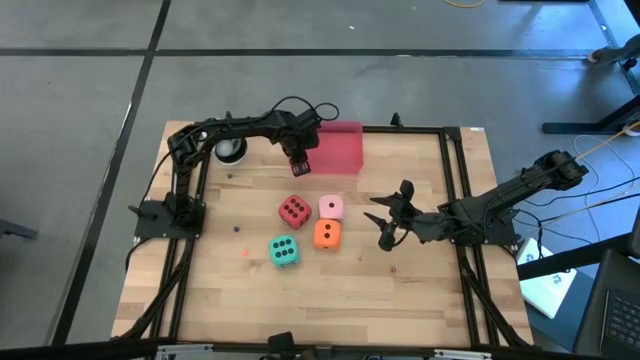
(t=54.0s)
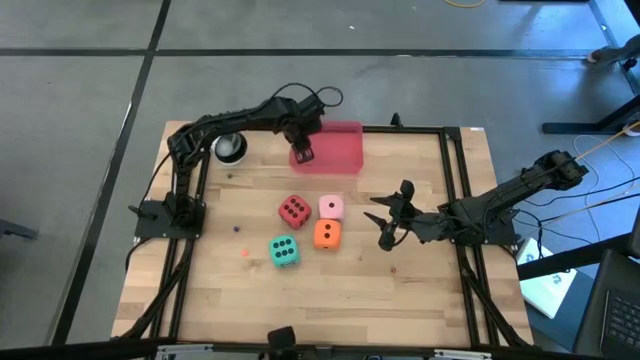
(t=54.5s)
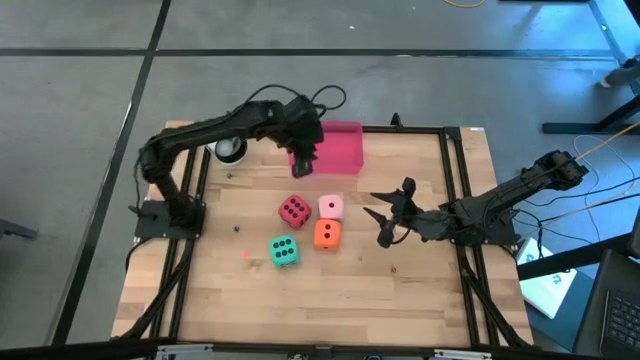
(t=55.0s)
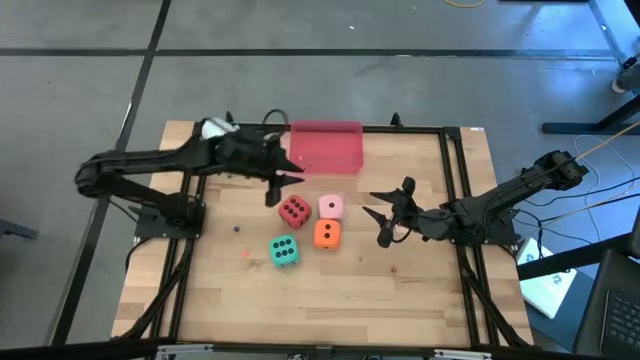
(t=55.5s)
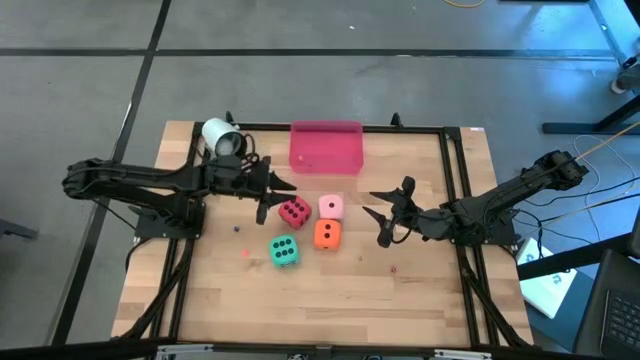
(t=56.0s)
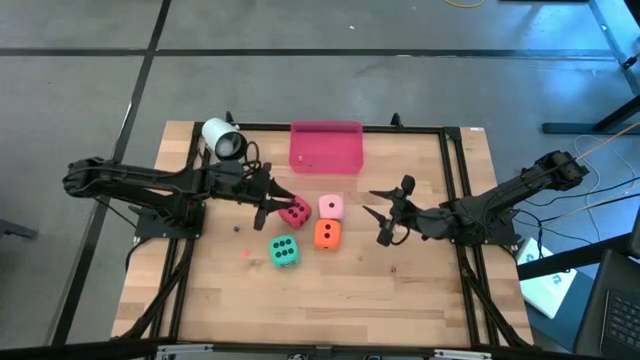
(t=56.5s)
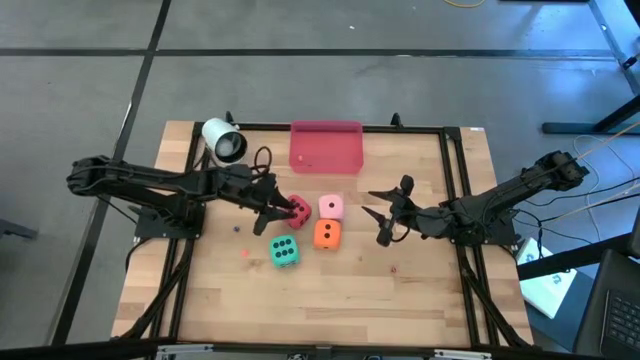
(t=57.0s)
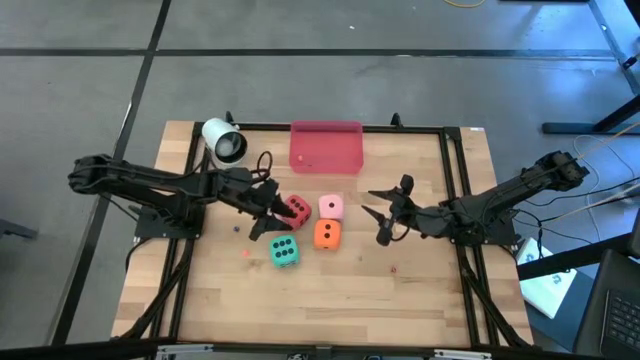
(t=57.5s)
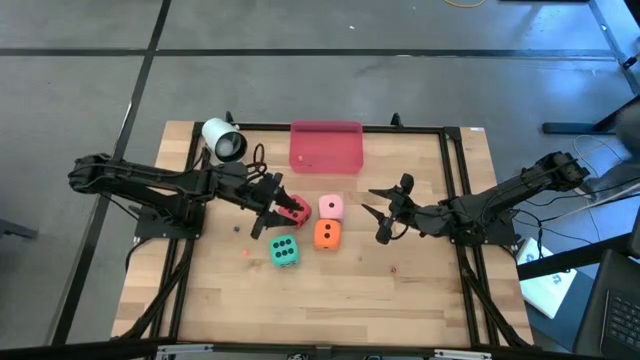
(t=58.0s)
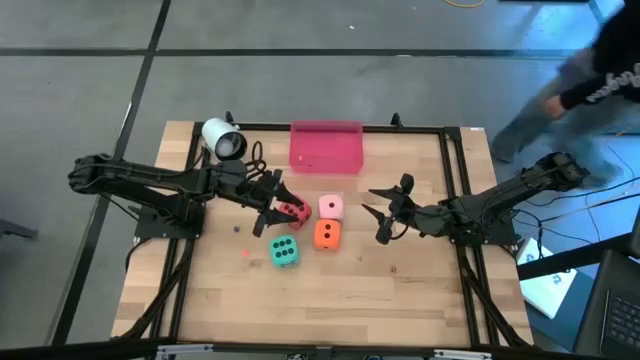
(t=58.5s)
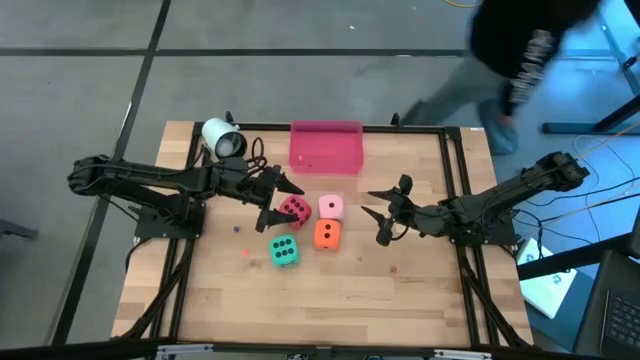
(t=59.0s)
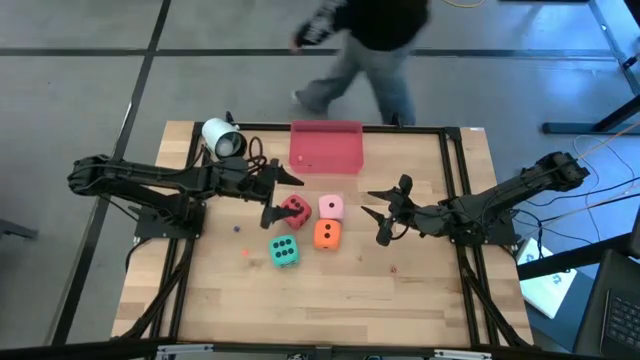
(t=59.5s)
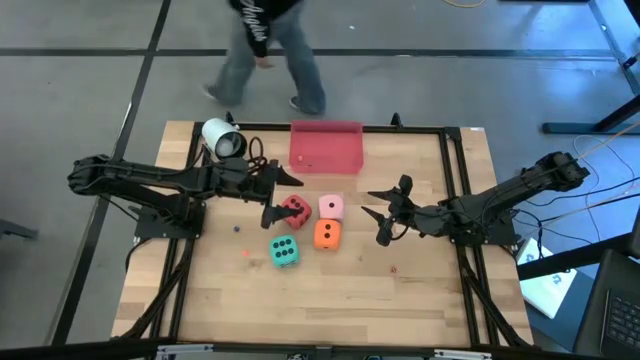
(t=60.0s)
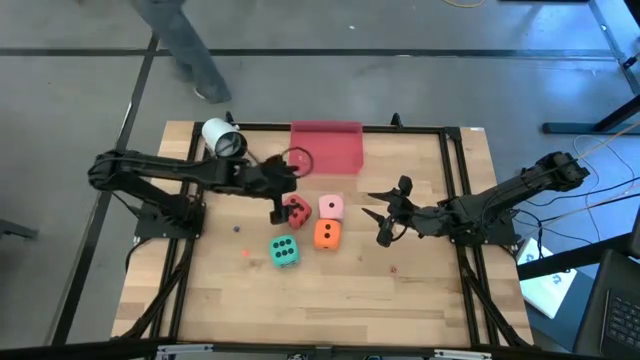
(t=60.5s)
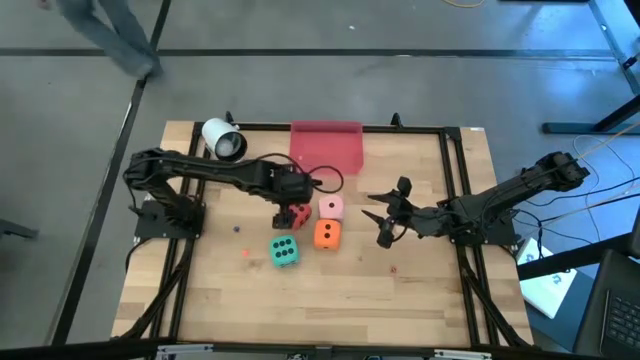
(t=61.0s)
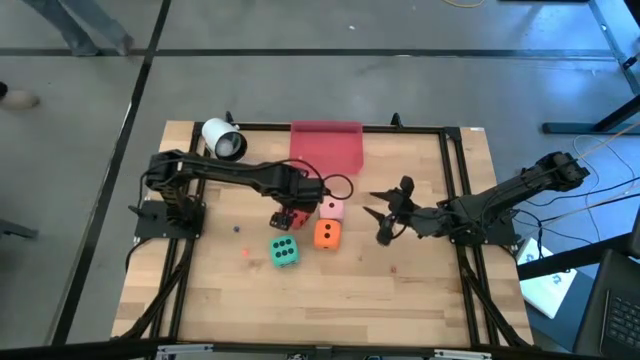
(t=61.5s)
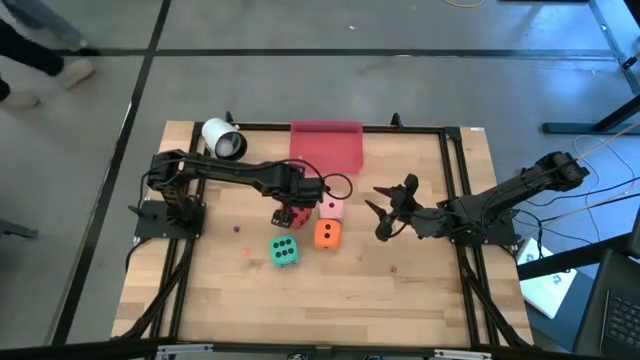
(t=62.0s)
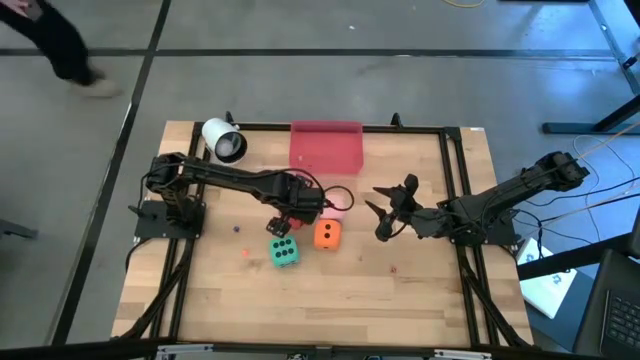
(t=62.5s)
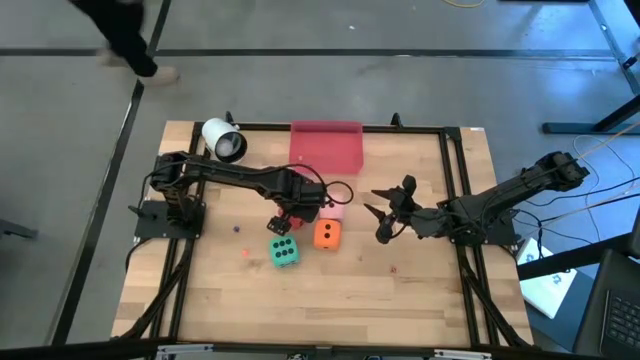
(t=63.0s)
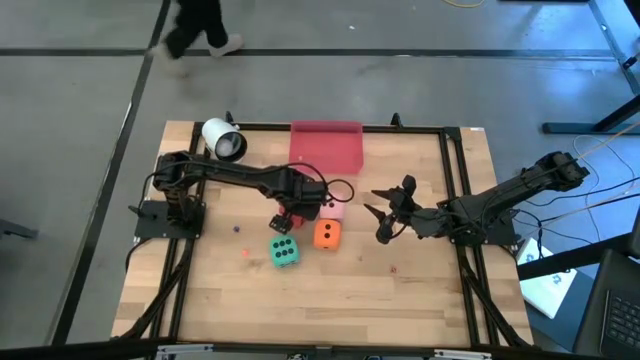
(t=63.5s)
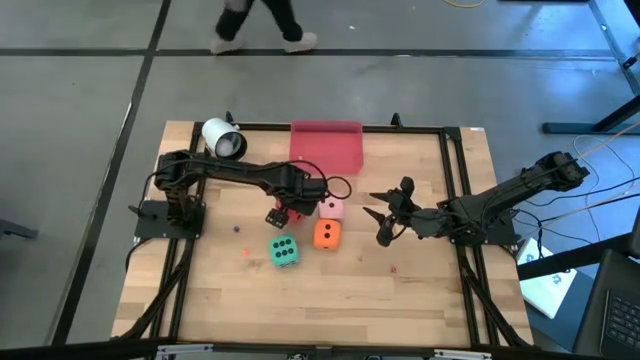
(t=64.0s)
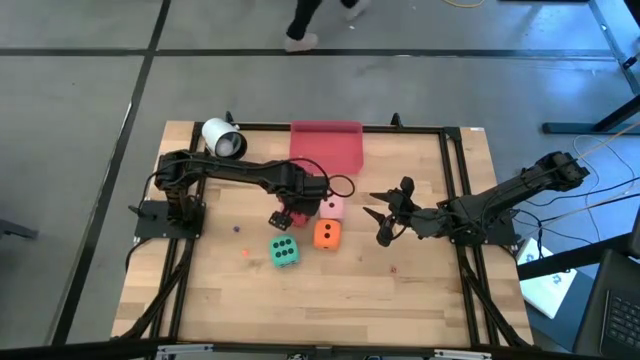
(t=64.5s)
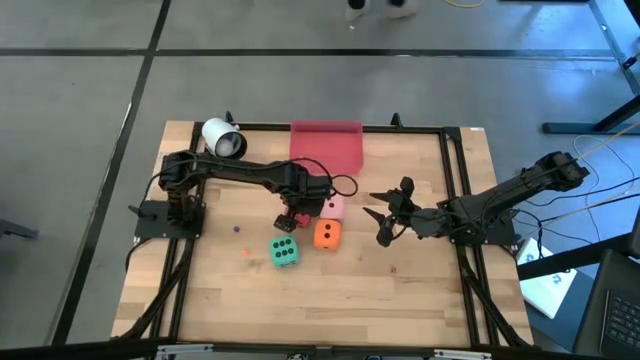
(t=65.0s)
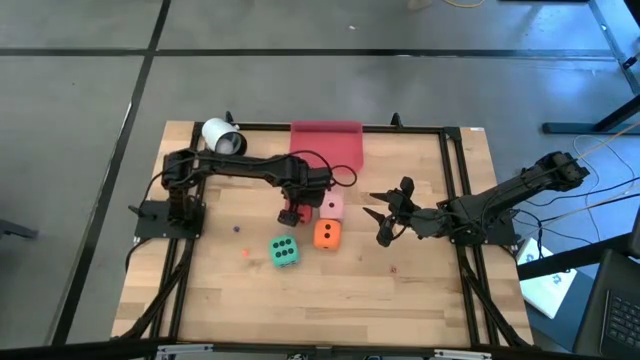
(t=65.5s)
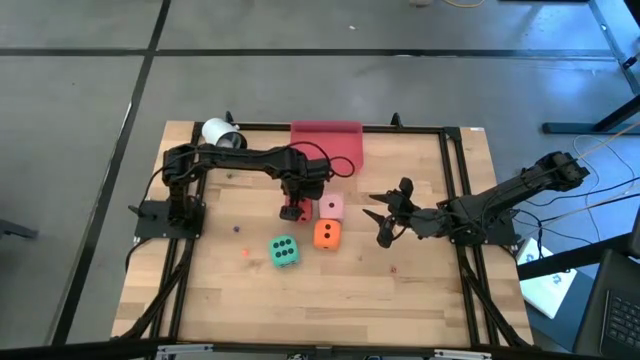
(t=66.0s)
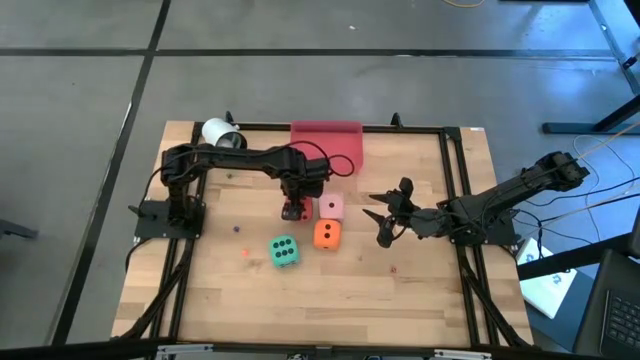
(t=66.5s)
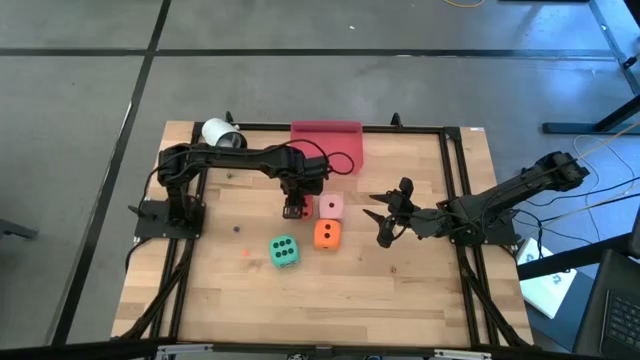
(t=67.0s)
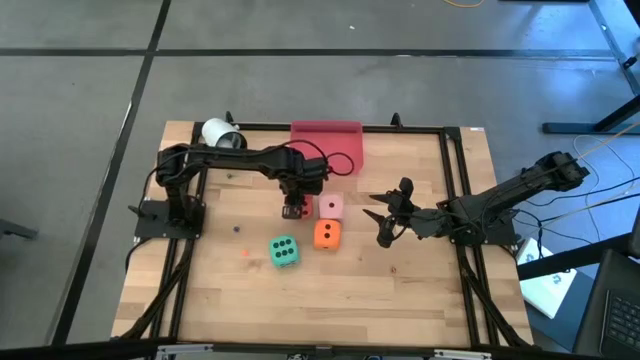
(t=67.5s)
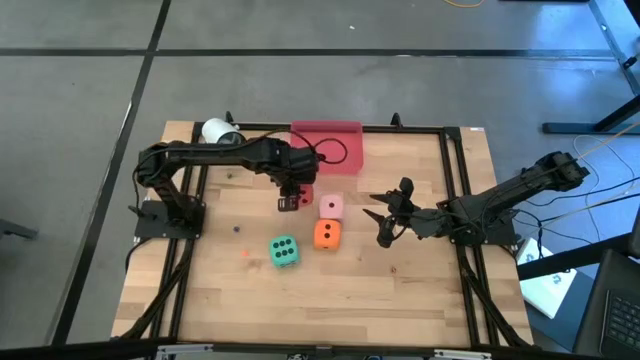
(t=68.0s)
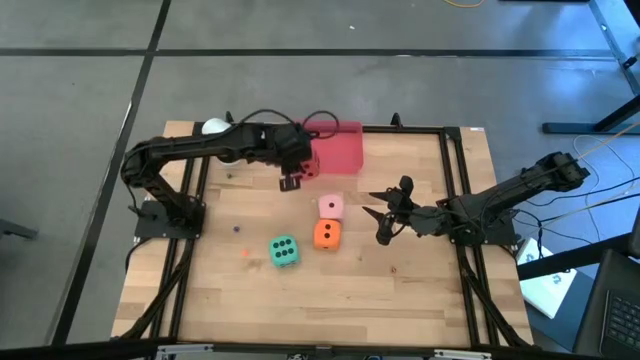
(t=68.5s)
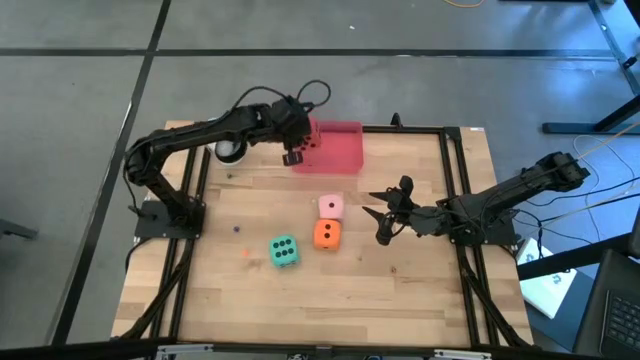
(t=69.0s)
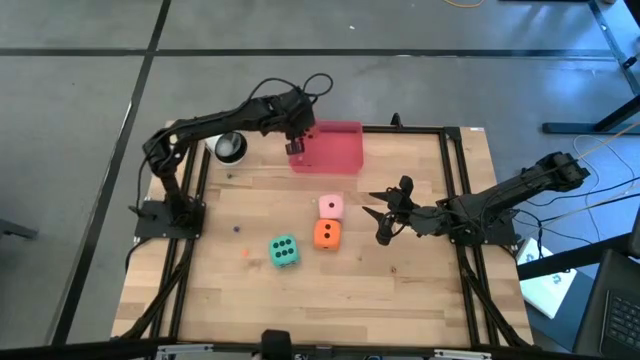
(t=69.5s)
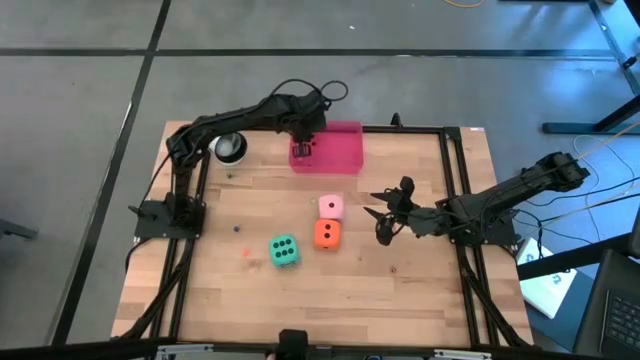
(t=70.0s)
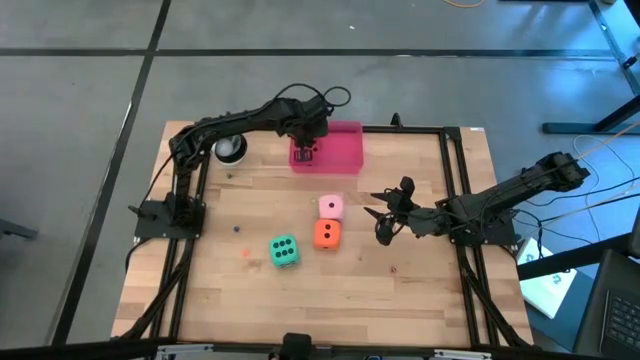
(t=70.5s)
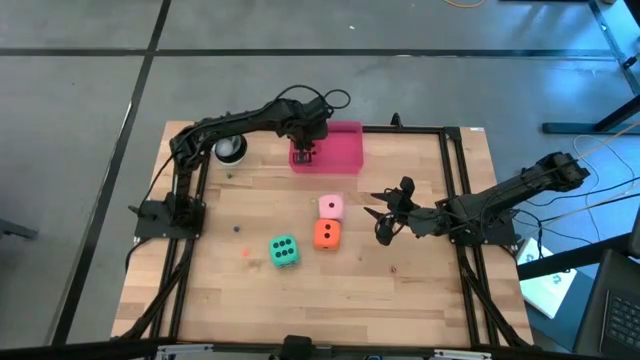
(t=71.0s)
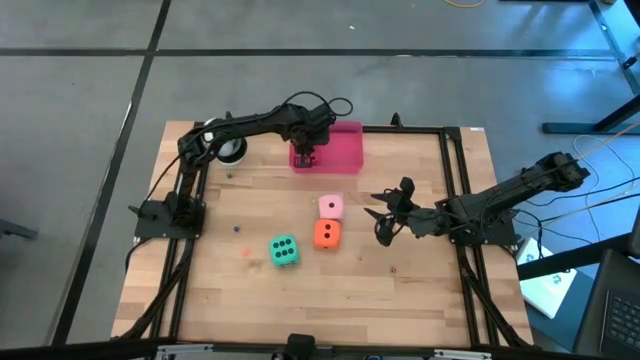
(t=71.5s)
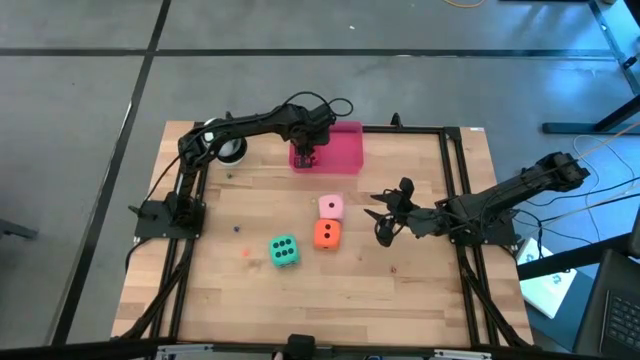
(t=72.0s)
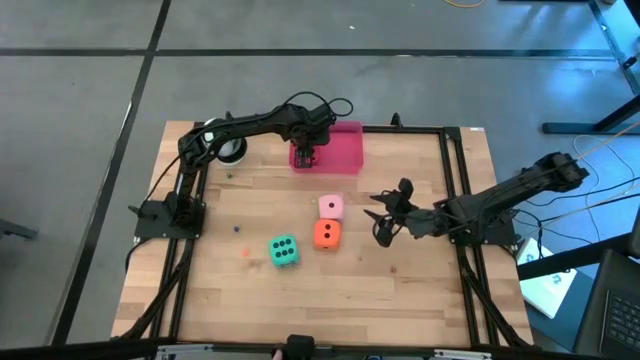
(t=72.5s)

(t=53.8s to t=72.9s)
Task: Pick & Place Dice
Put the top red die into the pink bin

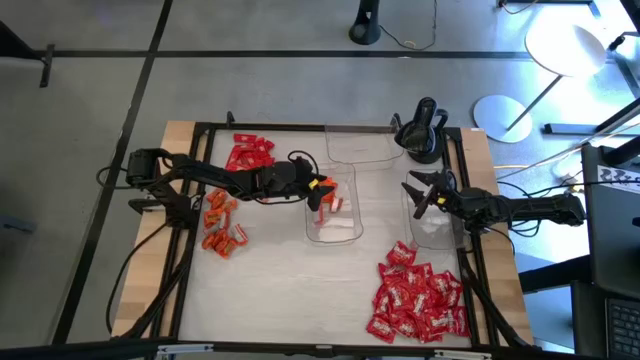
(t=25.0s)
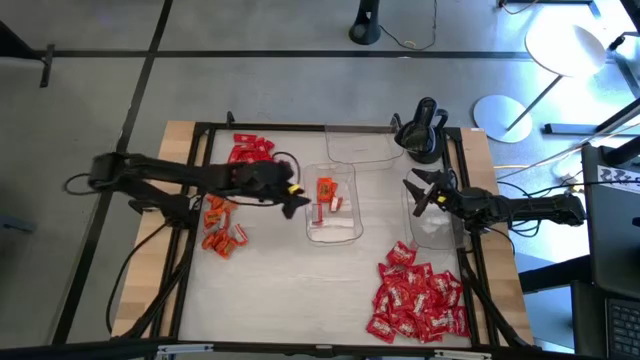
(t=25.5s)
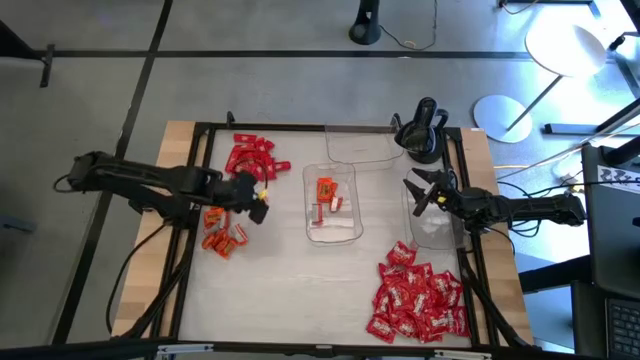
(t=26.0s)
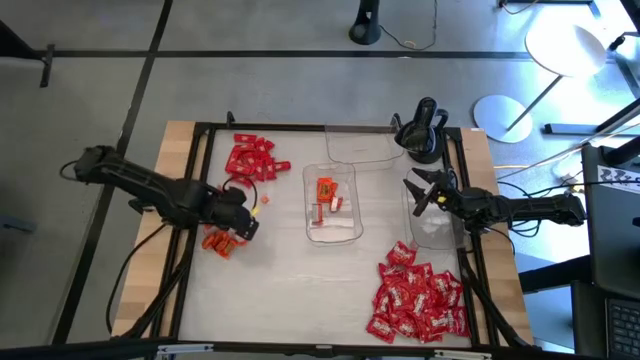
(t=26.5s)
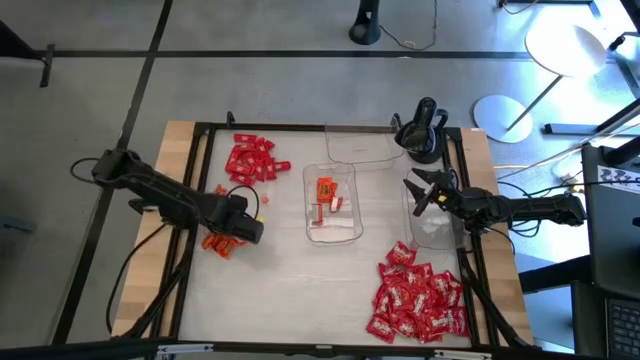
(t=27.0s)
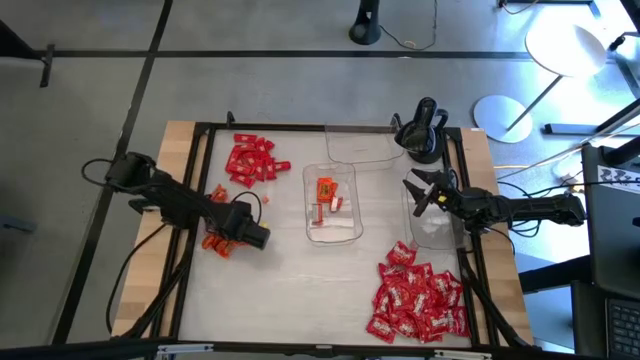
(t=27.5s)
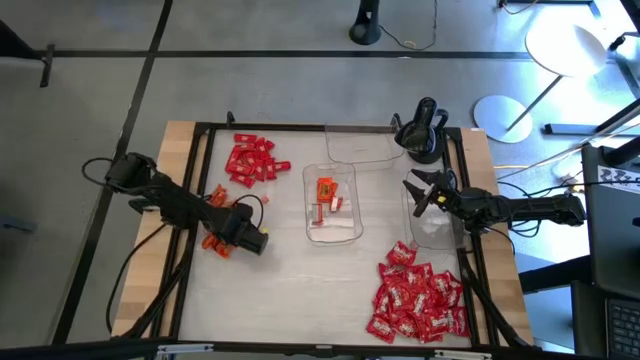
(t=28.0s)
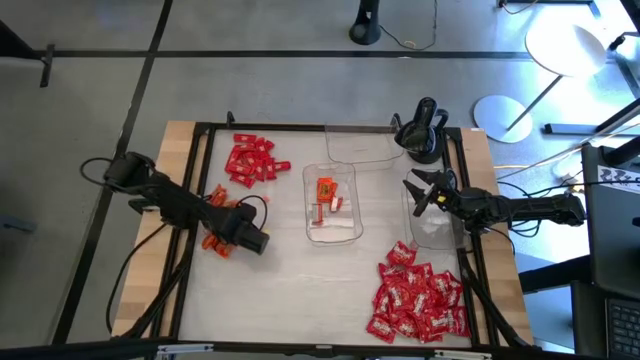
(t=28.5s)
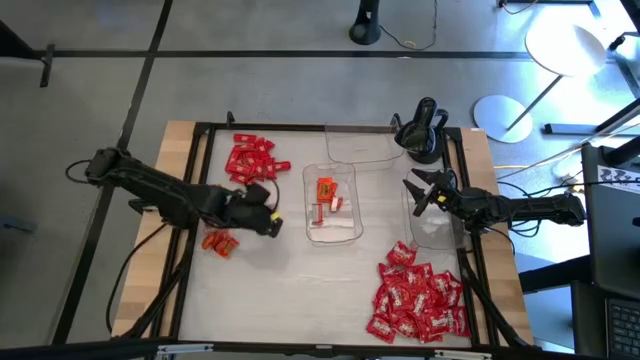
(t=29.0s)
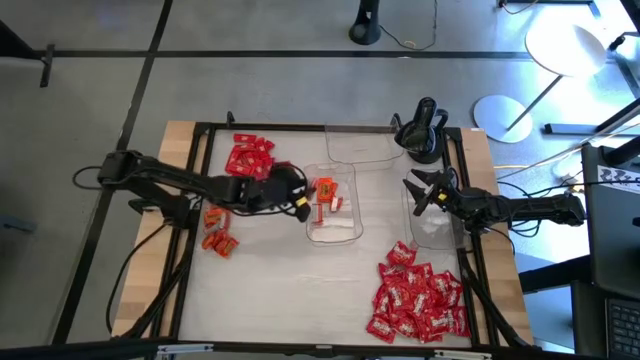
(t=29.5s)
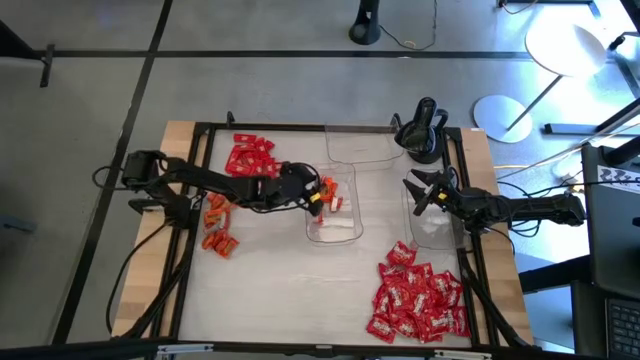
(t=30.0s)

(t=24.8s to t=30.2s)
Task: Sort candy
Put the orange chocolate into the bottom left transparent bin
